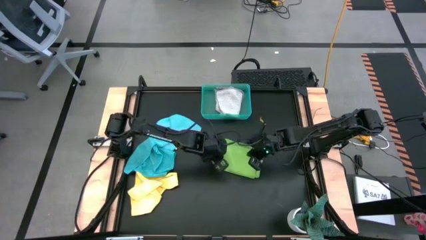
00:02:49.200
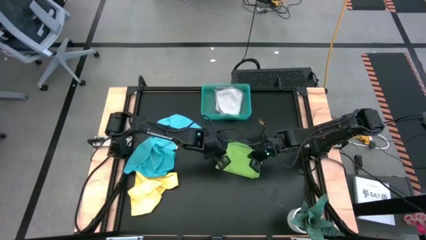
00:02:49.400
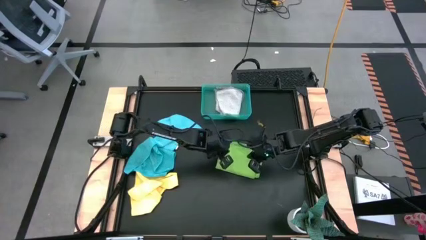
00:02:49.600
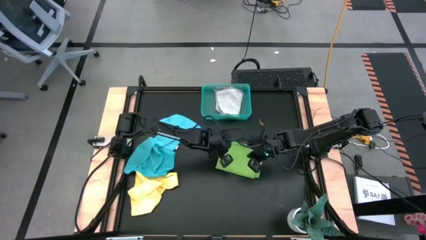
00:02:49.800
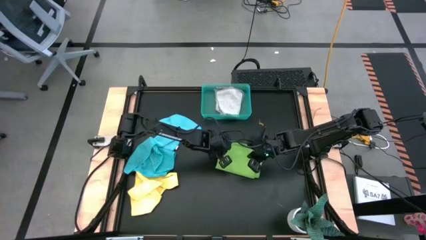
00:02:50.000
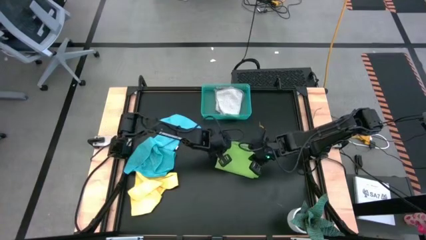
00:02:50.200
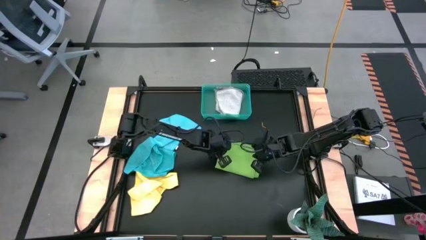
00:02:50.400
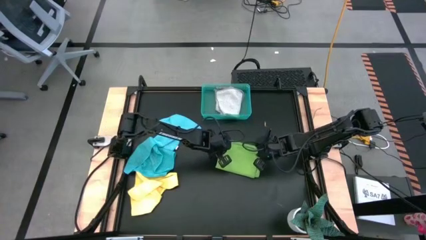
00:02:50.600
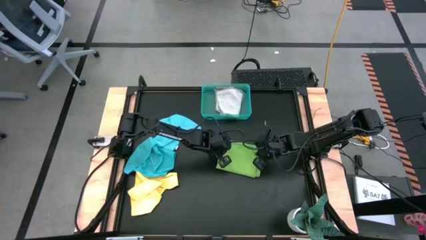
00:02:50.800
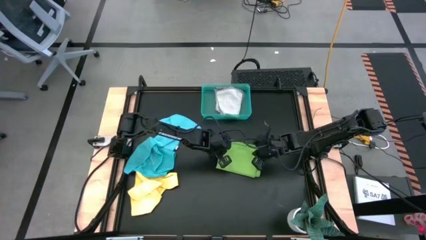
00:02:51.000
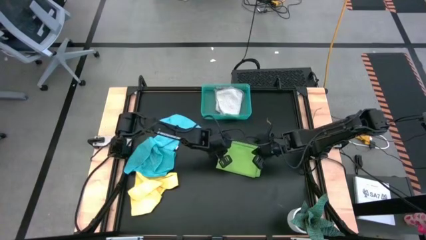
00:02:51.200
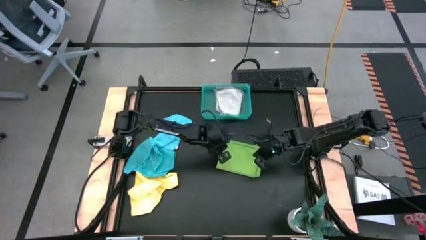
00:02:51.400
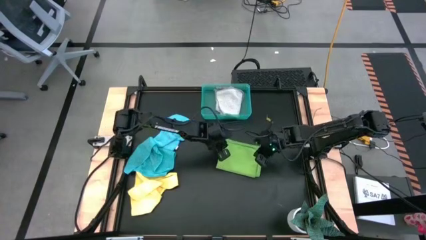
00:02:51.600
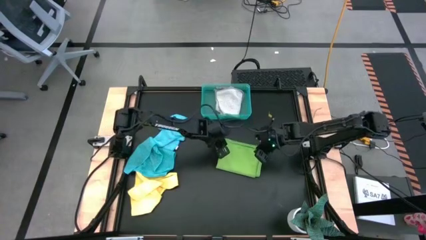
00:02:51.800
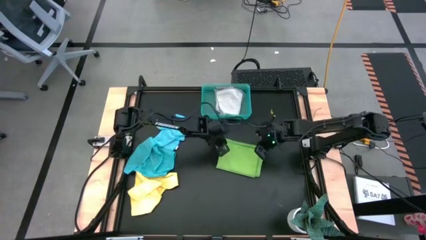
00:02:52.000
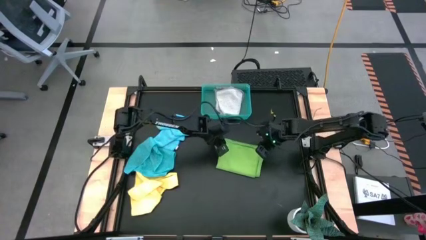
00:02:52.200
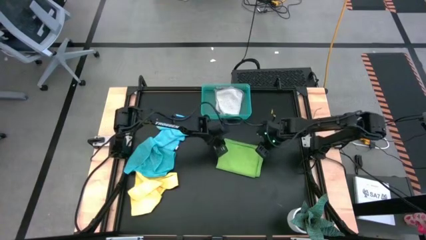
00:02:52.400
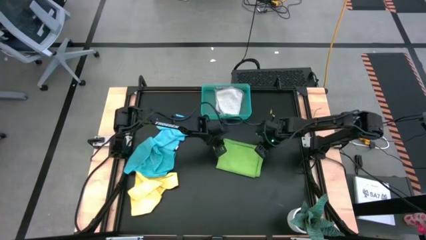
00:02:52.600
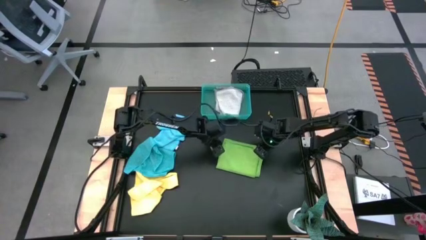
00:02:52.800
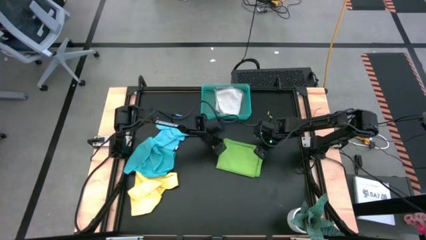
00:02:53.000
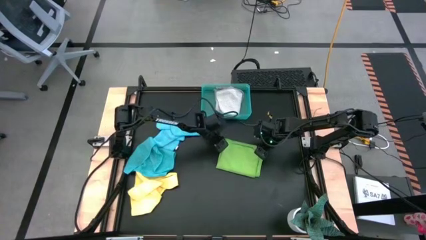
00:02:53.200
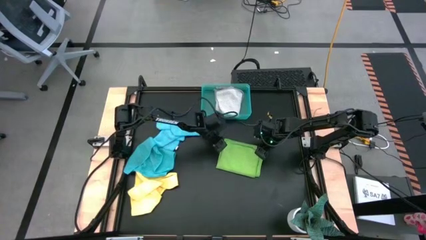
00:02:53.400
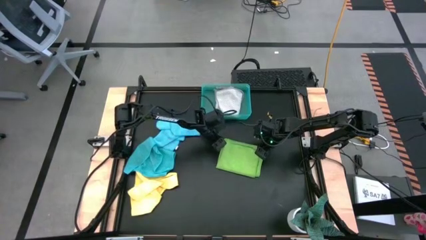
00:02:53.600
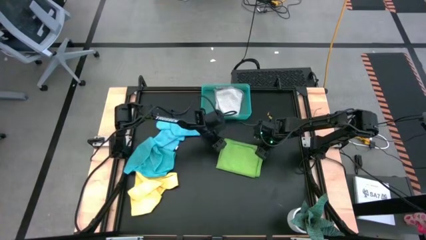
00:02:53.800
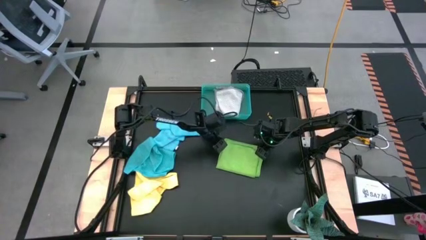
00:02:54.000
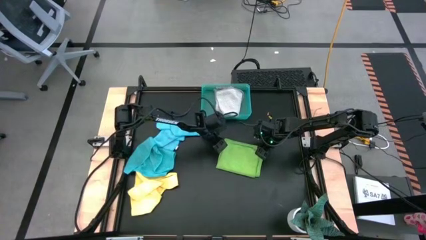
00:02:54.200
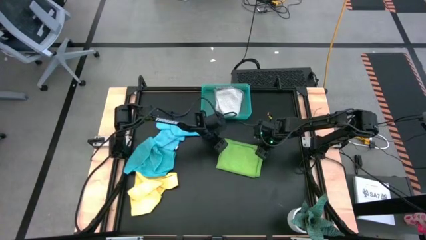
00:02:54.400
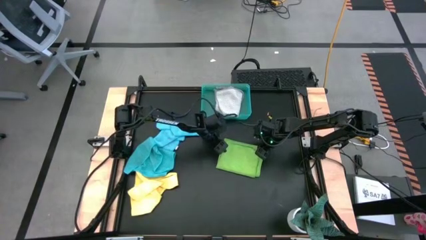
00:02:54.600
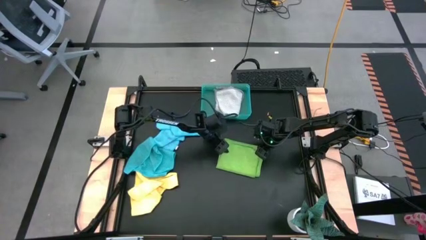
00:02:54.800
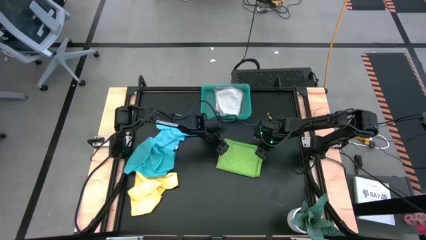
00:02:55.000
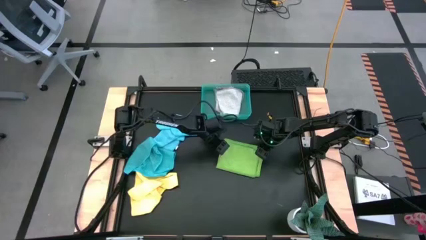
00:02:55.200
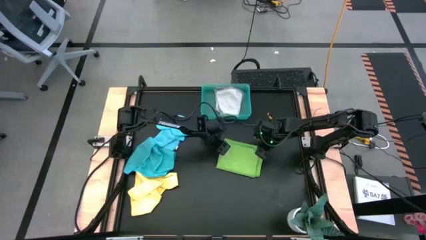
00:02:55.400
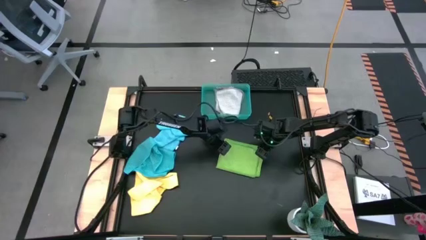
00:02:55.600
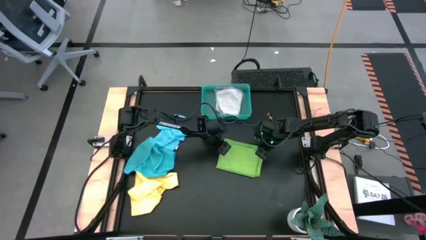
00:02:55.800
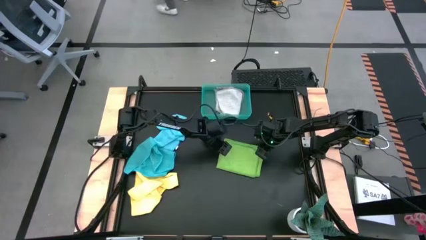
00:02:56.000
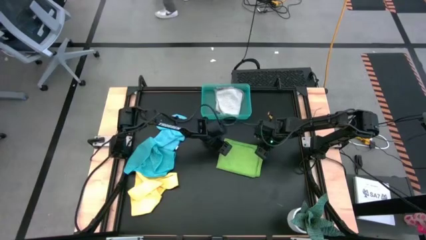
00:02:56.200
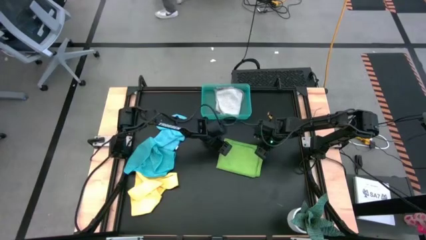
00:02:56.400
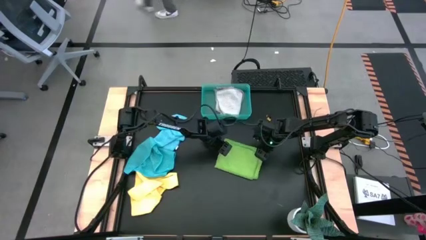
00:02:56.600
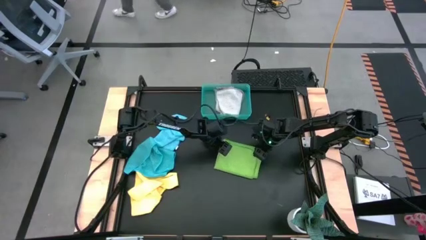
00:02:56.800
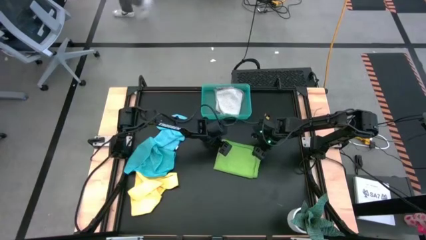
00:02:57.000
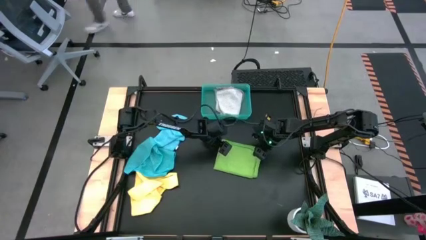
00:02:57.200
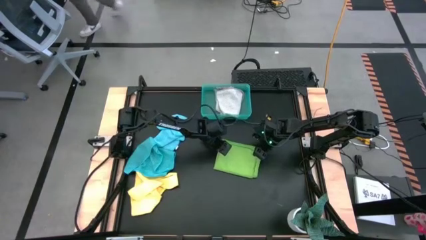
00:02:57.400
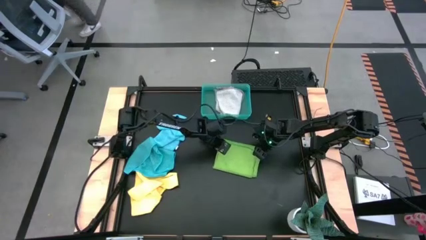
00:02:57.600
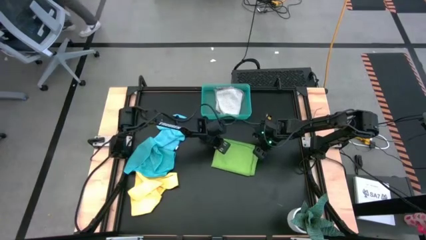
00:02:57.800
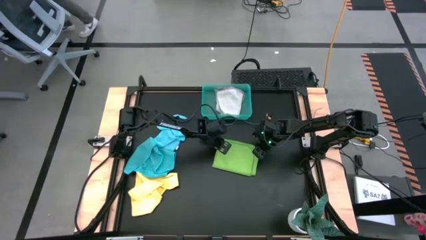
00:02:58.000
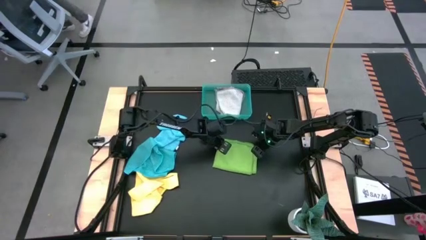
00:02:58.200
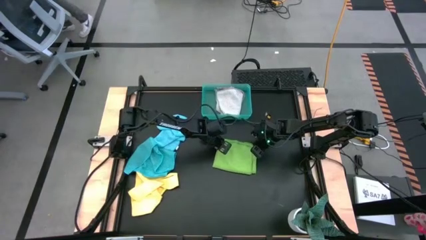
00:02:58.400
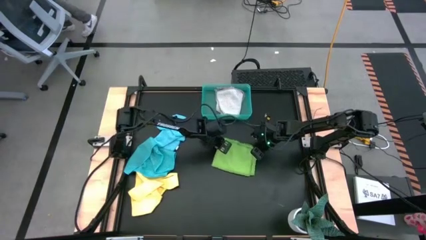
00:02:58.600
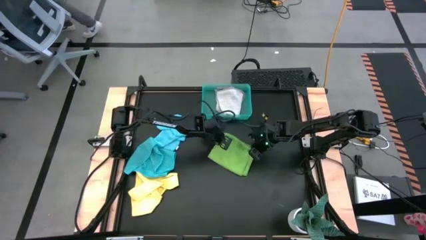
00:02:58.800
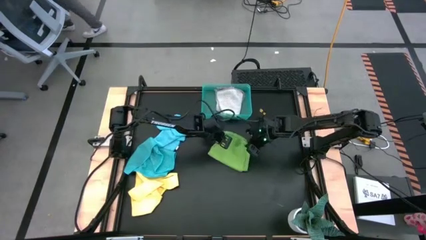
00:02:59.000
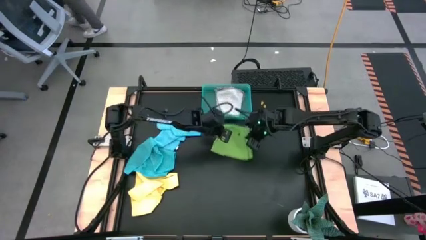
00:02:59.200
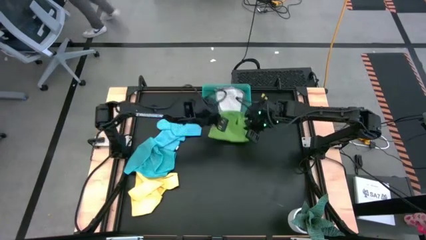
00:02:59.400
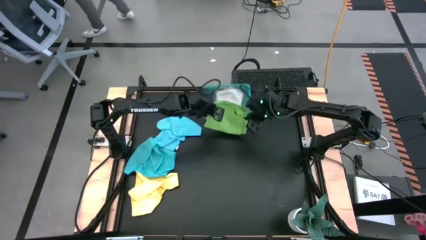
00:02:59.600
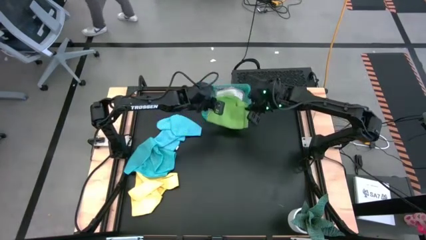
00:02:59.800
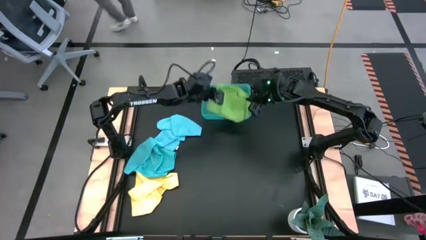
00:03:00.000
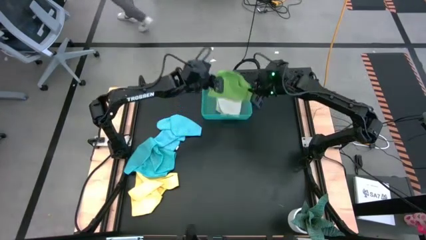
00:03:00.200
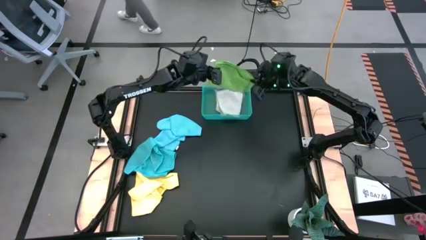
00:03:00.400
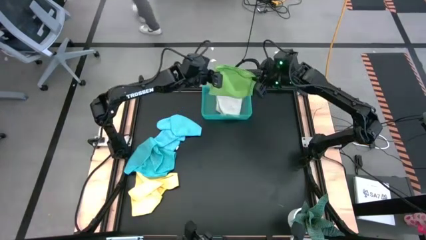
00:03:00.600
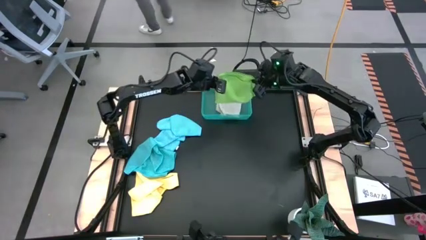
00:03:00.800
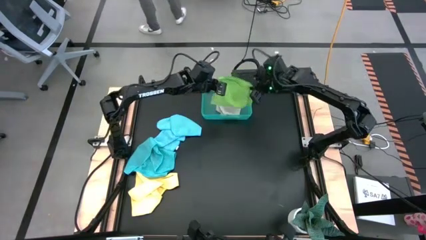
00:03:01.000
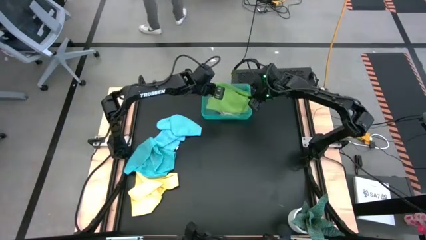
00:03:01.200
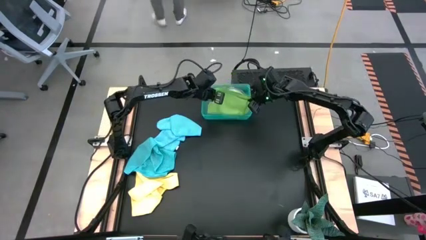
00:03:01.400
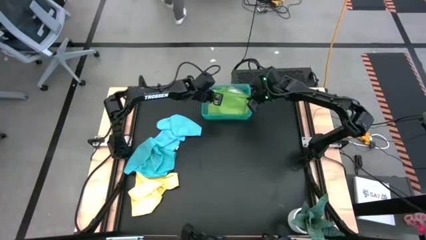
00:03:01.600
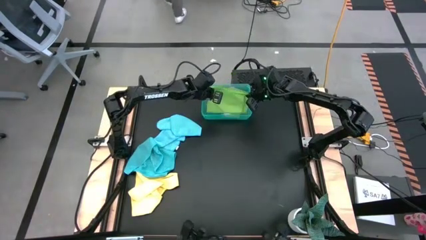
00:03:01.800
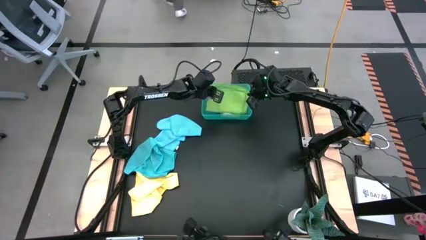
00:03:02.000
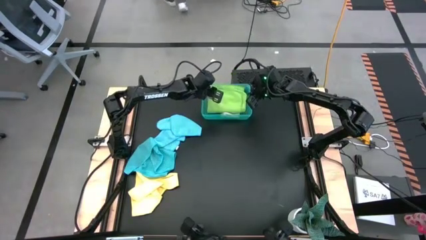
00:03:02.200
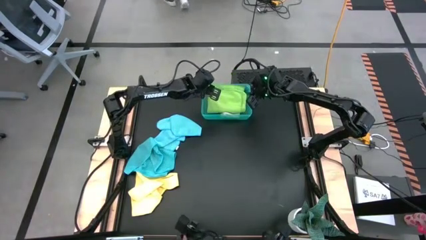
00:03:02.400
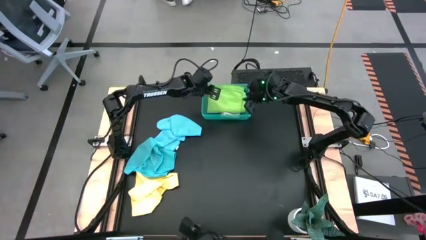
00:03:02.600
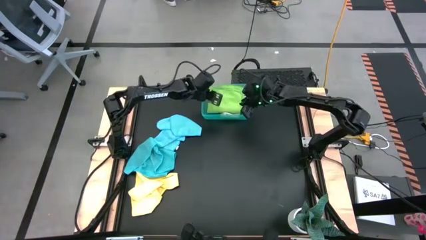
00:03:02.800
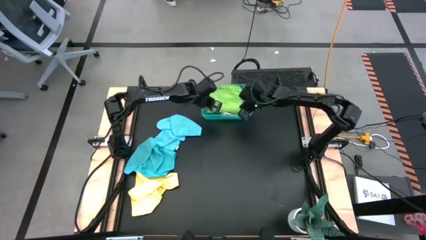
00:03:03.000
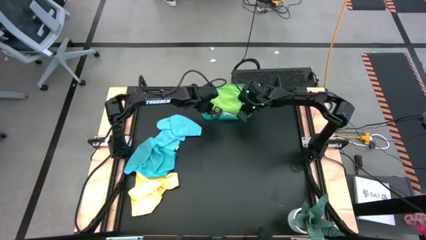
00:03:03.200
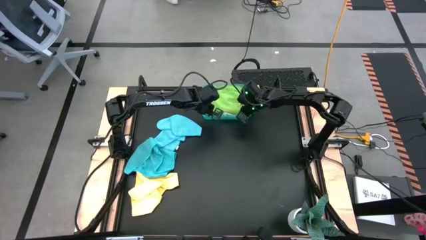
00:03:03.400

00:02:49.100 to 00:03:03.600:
Task: Fold microfiber towels
Put the green microfiber towel into the blue bin
